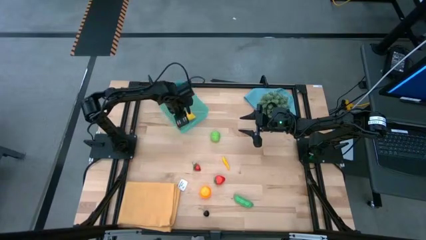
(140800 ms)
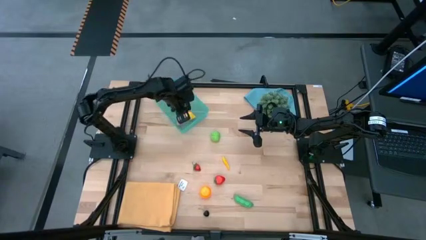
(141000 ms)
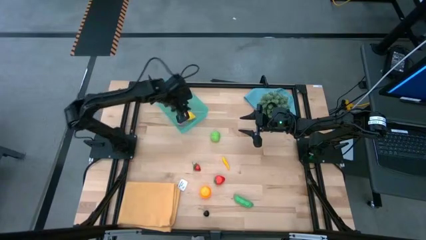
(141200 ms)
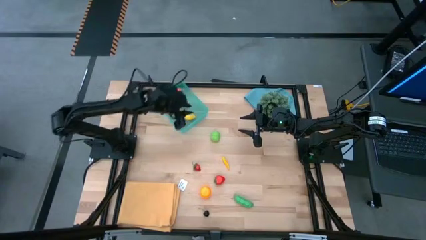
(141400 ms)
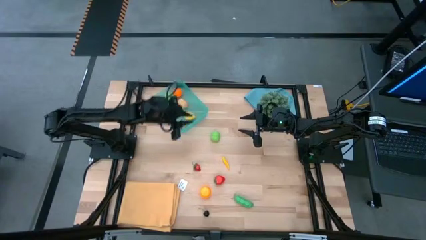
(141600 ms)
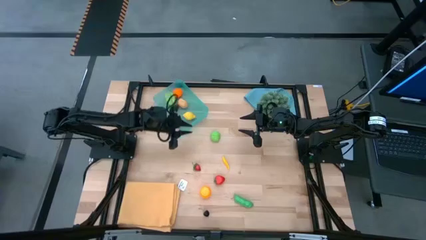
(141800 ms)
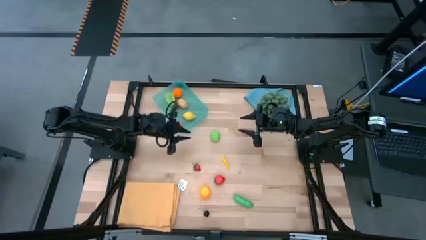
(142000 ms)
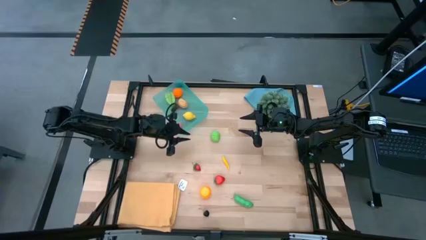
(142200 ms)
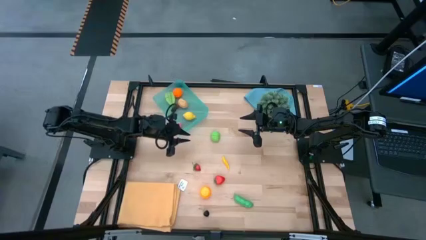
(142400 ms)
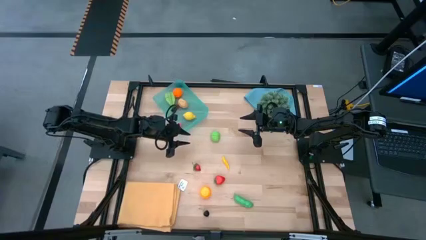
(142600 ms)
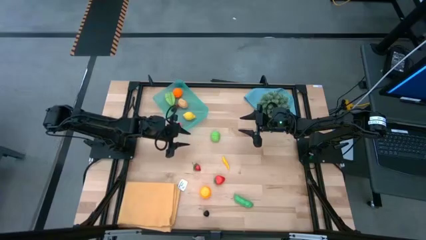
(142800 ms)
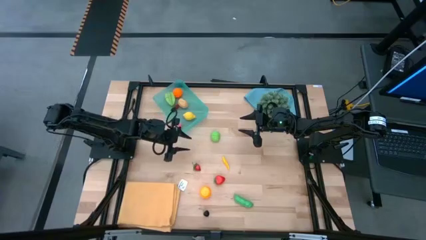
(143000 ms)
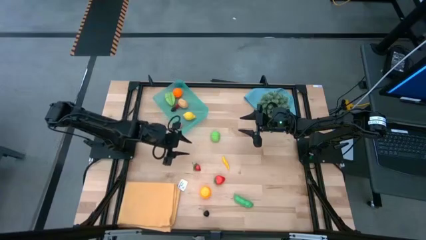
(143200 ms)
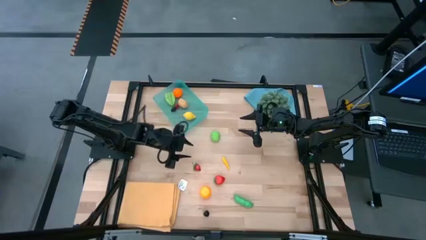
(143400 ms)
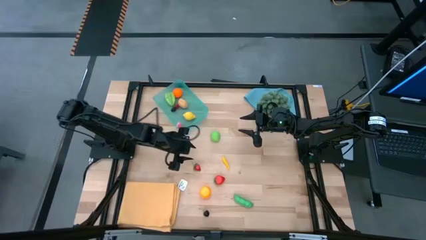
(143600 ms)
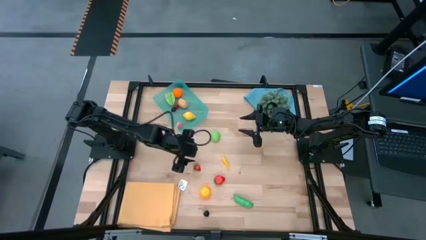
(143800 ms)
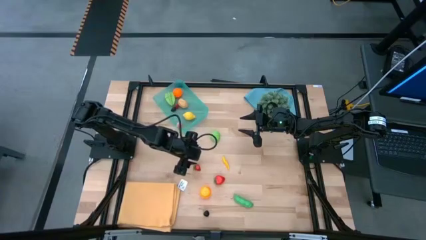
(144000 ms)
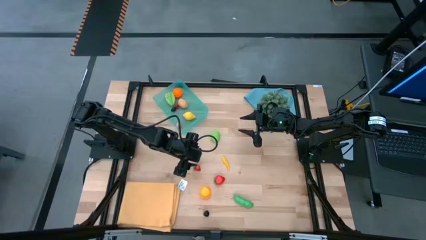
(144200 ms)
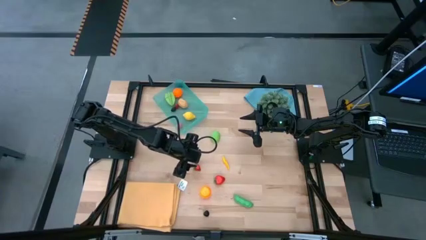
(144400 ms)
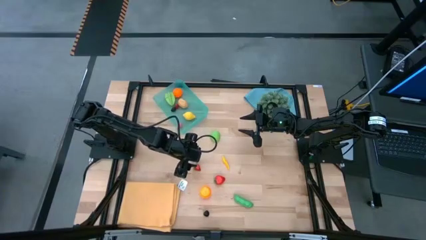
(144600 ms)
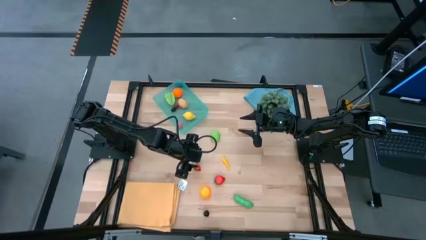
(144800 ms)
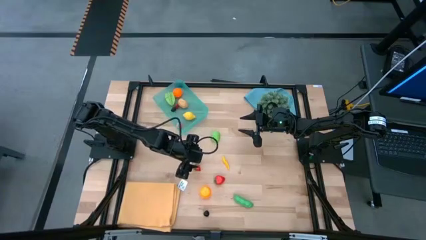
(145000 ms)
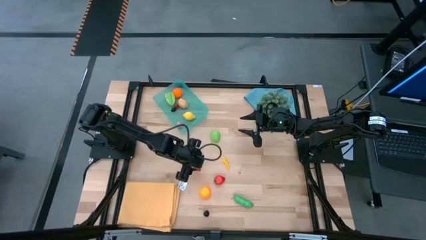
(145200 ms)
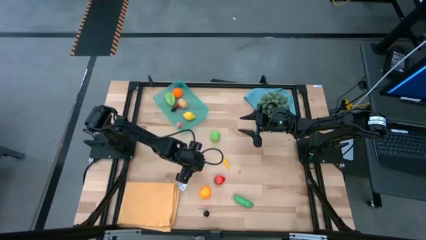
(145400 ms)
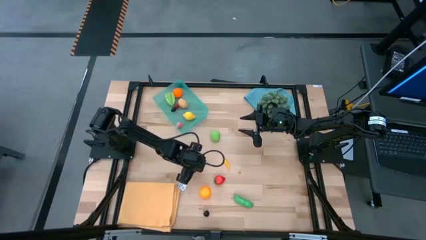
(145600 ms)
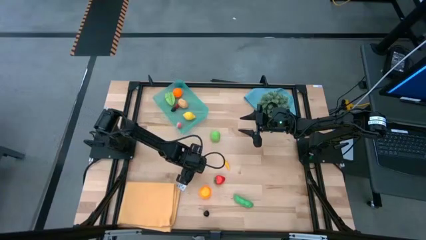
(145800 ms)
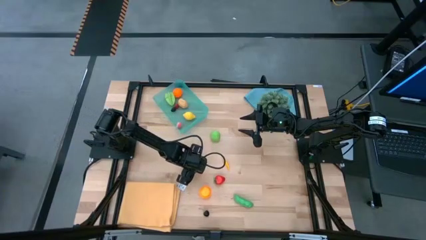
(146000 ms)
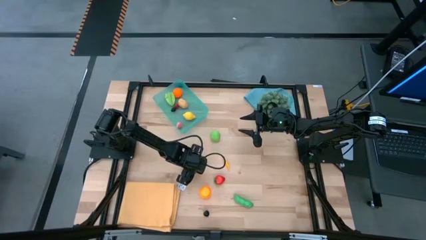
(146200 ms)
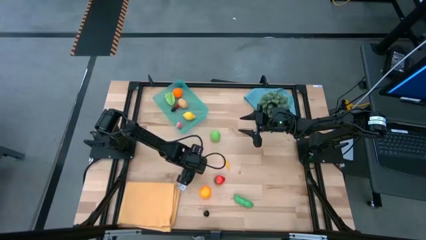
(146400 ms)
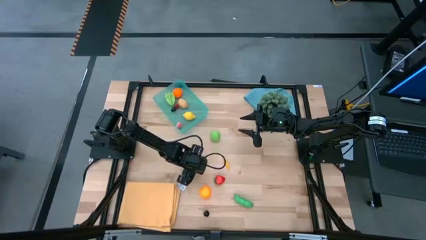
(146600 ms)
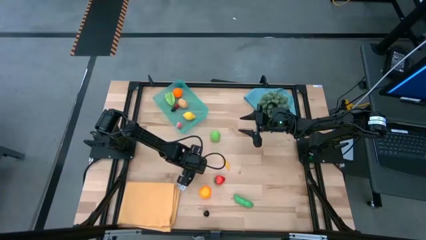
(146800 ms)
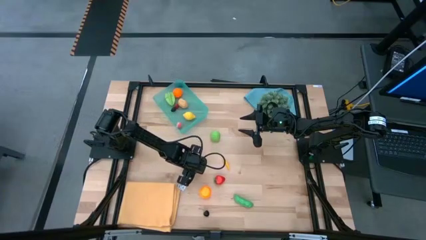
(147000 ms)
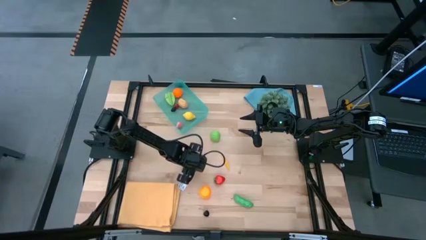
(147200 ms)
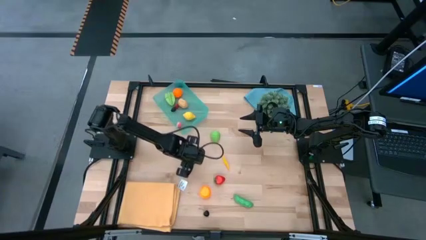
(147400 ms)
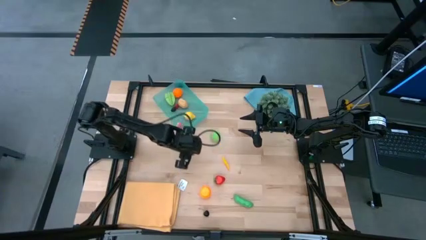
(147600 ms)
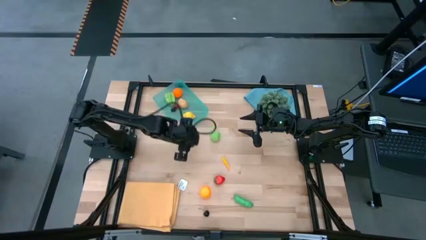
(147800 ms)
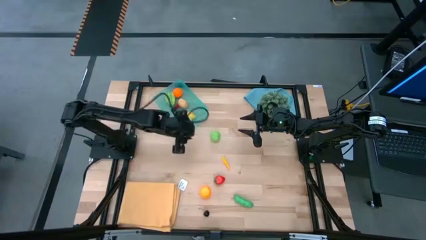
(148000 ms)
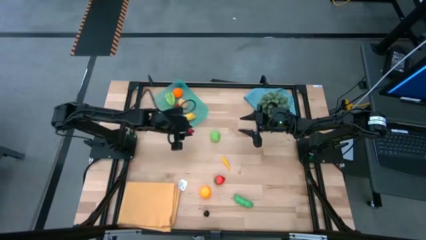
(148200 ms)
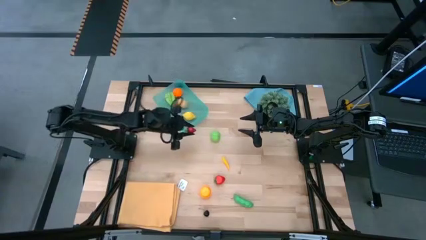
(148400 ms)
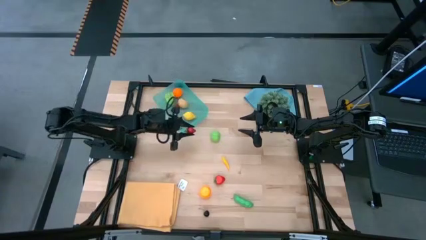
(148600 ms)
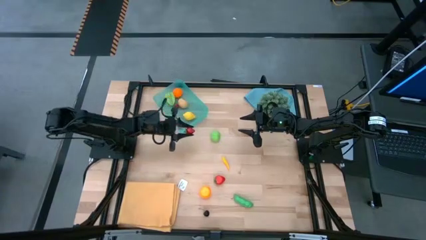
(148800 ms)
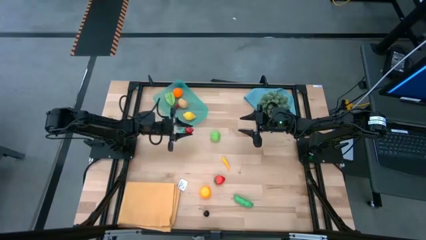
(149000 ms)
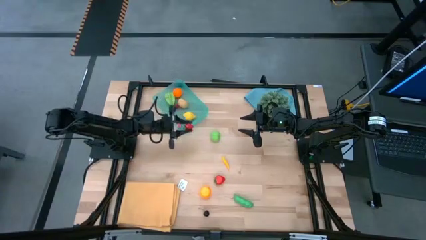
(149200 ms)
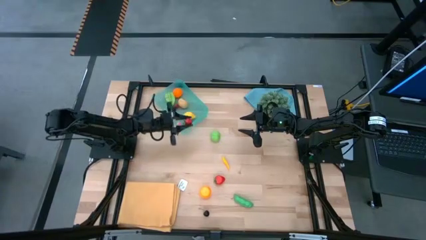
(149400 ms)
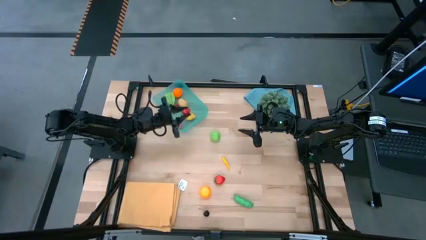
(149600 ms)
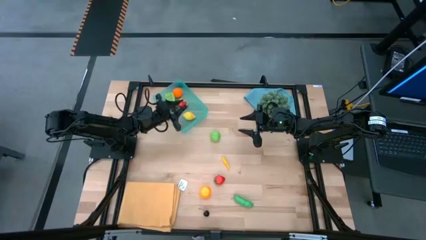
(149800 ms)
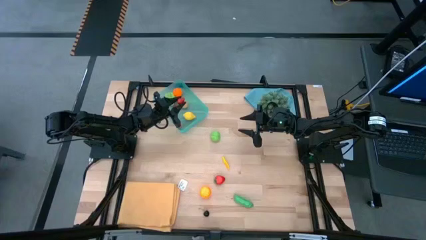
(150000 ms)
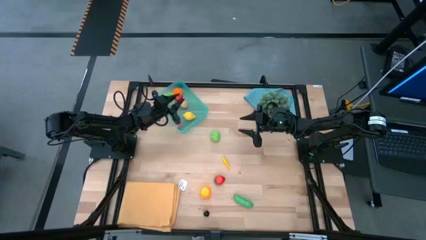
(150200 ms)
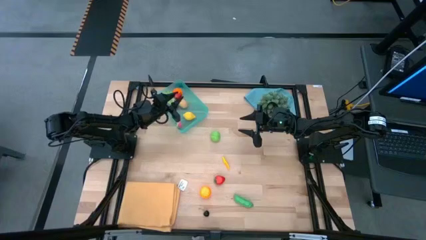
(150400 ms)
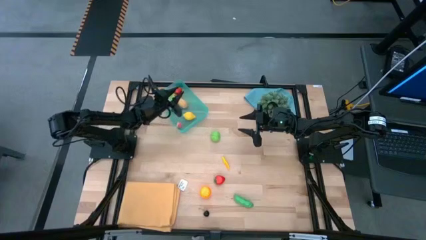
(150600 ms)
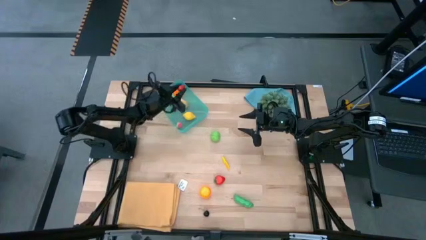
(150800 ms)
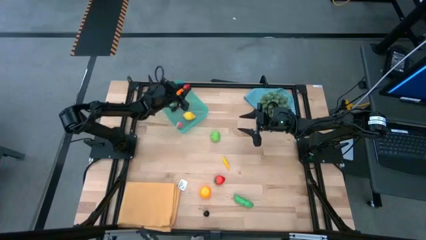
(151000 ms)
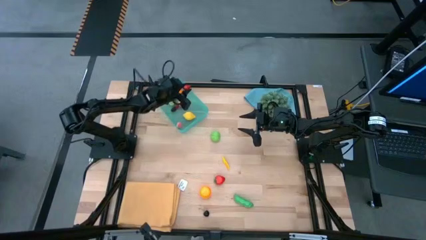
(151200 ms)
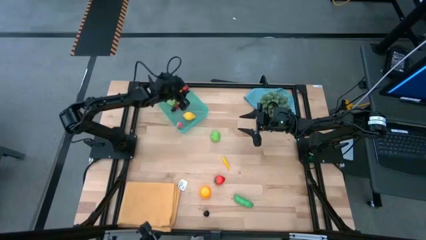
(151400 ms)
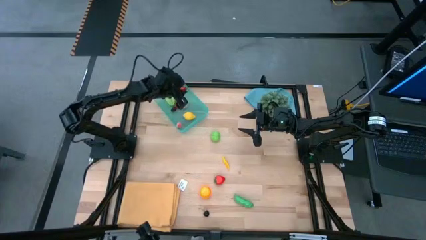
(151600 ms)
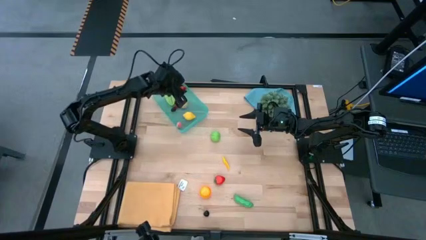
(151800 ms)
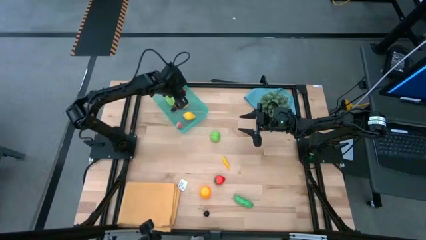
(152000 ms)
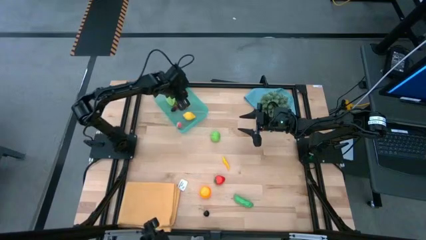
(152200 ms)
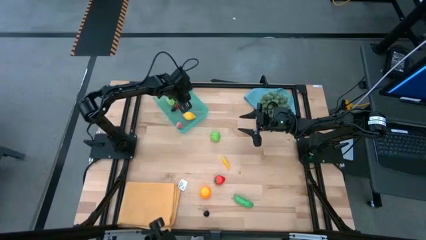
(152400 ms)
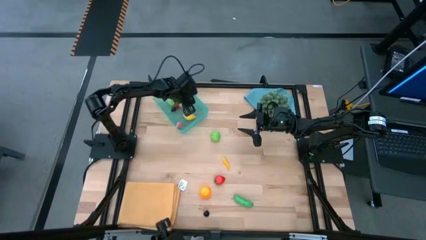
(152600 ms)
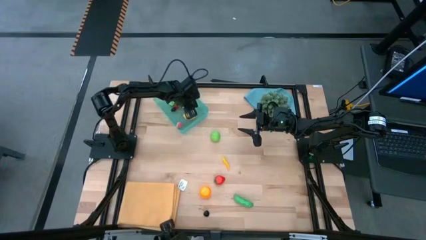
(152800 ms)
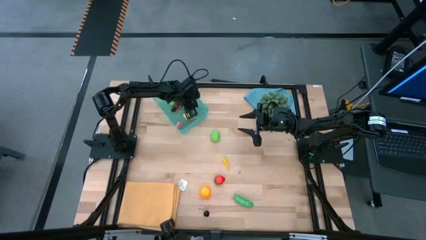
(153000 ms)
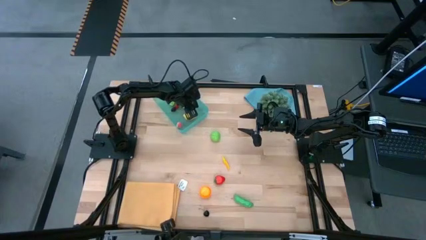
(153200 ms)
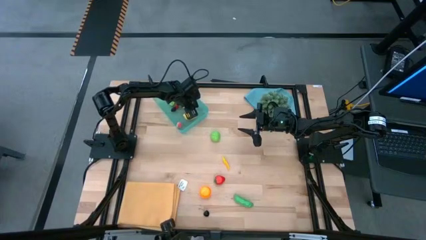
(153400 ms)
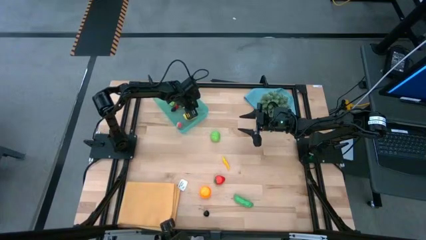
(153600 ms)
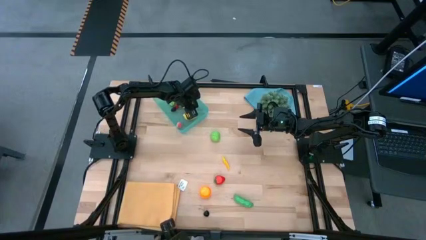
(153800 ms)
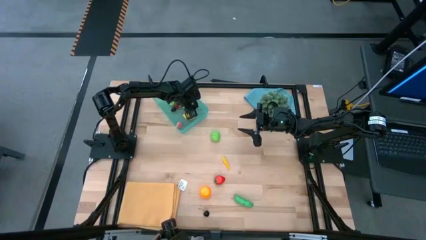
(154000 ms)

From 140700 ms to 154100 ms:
Task: Pick and placing Produce into tupperware
Put the top red strawberry into the blue bin

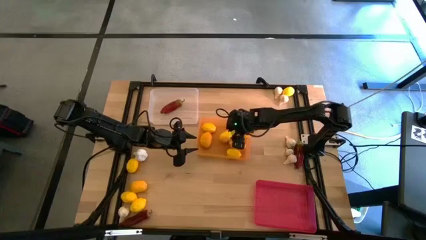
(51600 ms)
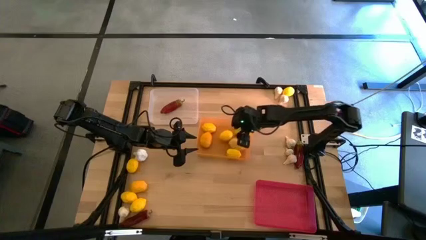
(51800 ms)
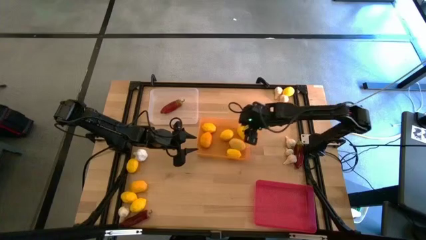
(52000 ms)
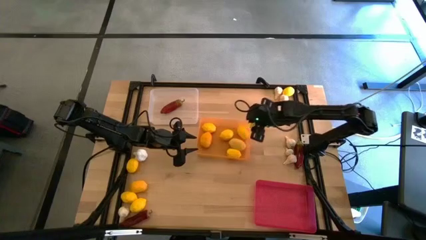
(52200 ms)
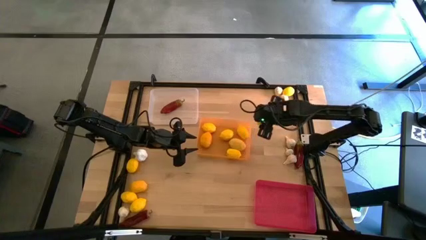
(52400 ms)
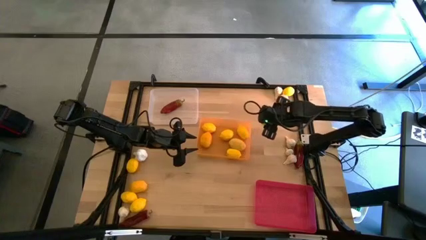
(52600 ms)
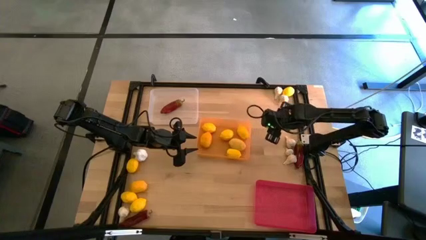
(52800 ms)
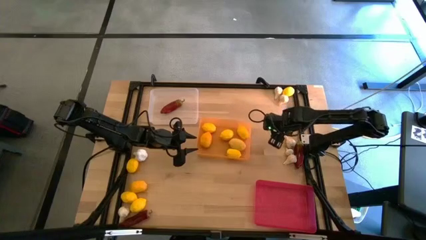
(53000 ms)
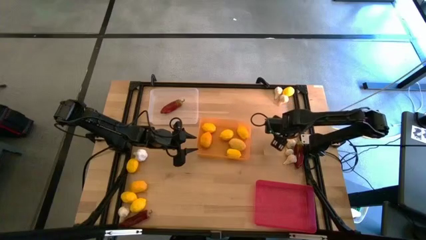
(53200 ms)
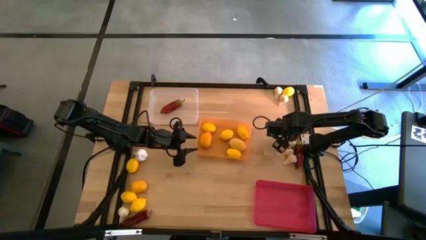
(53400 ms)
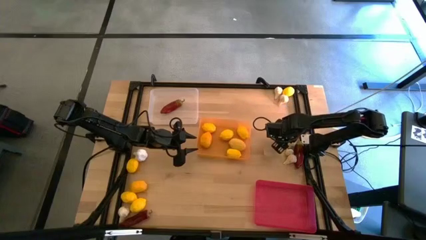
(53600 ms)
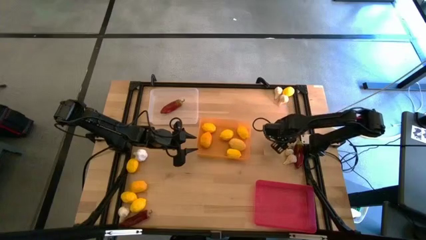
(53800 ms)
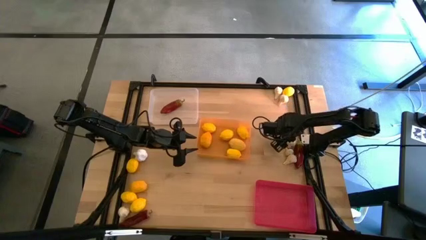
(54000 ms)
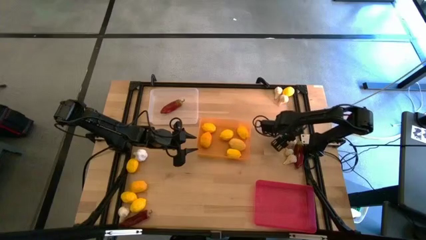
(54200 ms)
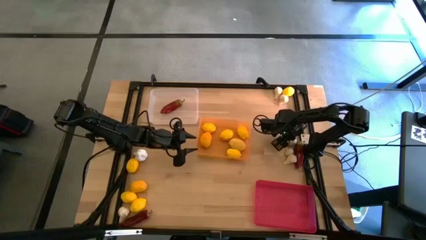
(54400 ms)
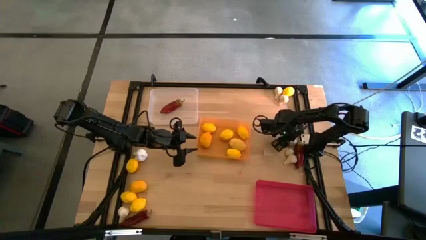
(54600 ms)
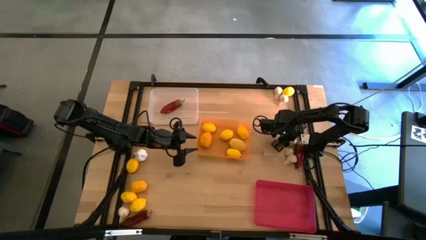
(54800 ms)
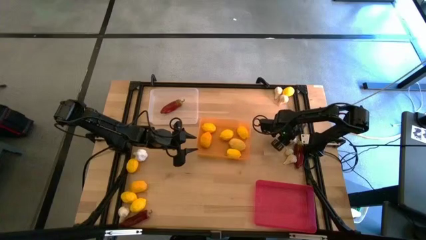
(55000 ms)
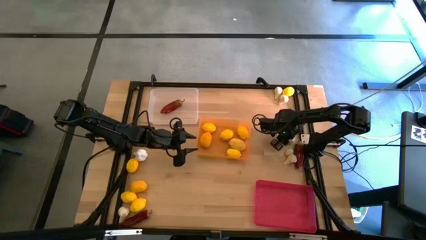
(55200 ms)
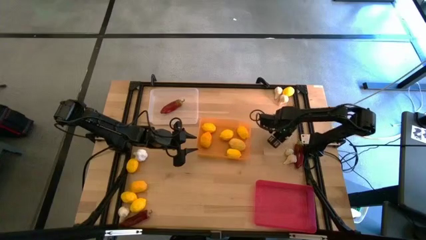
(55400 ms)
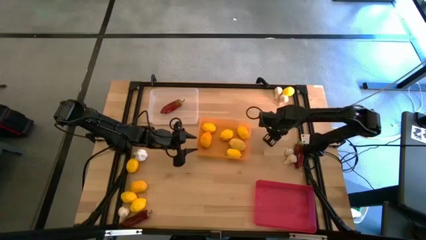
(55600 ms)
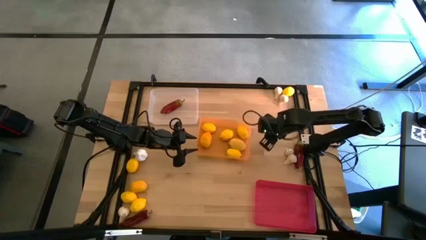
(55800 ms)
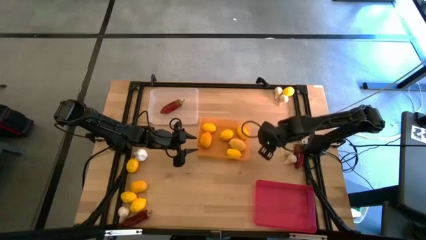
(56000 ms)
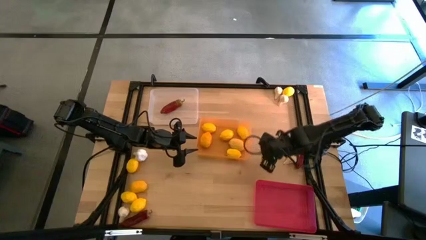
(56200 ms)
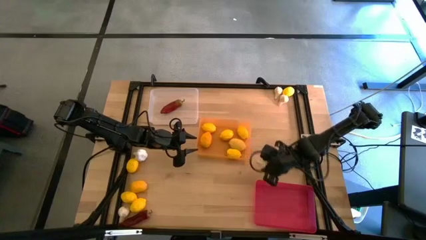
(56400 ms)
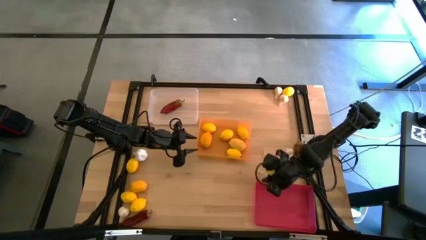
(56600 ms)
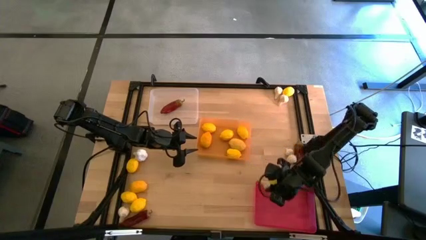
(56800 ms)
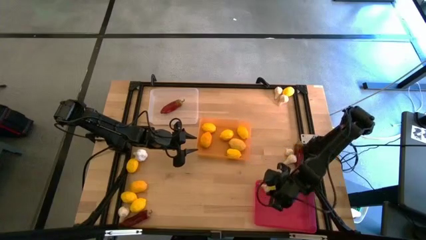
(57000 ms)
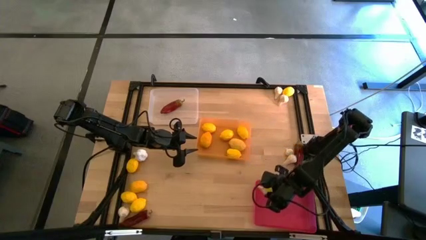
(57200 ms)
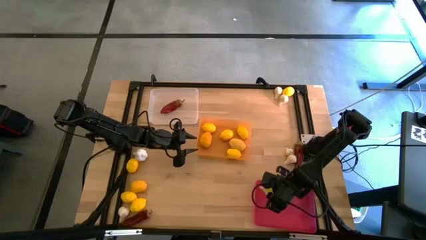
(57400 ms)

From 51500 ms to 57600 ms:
Task: Sort produce into baskets
Put the garlic into the red bin
